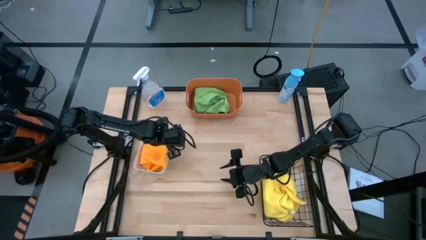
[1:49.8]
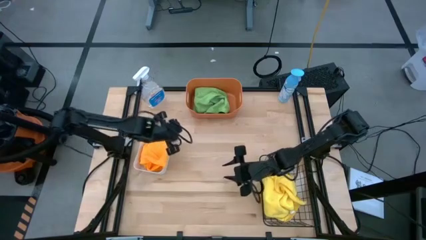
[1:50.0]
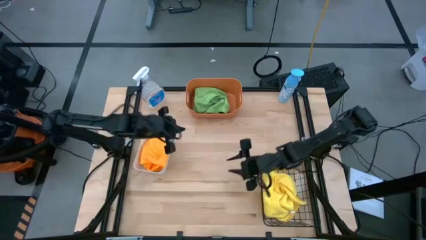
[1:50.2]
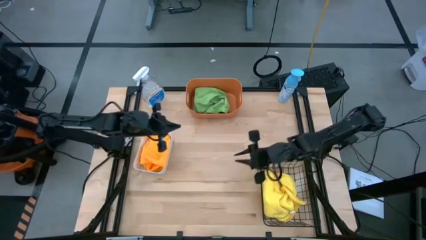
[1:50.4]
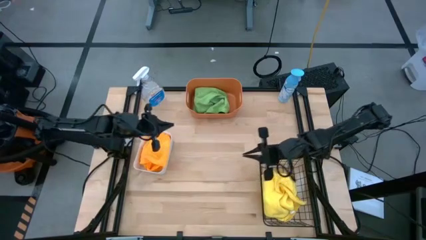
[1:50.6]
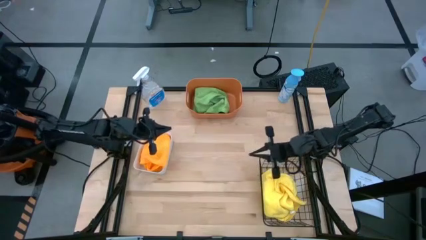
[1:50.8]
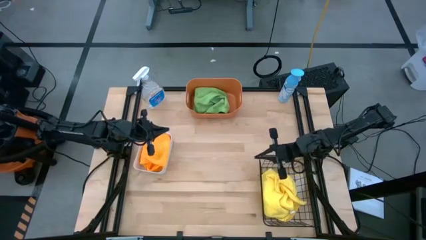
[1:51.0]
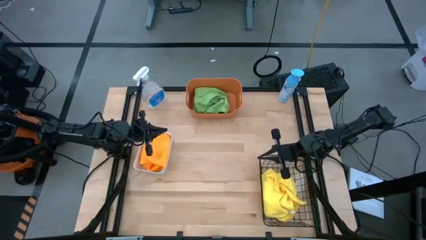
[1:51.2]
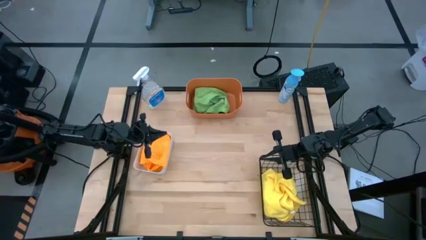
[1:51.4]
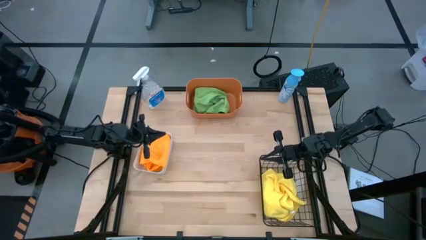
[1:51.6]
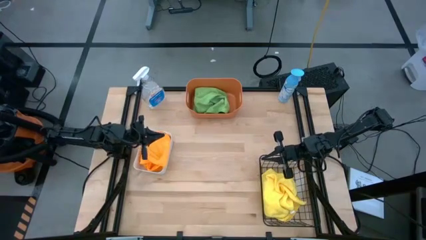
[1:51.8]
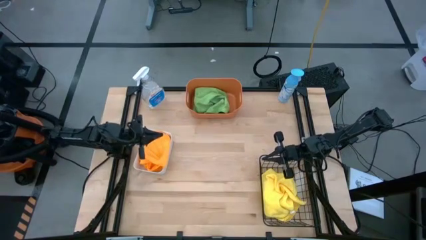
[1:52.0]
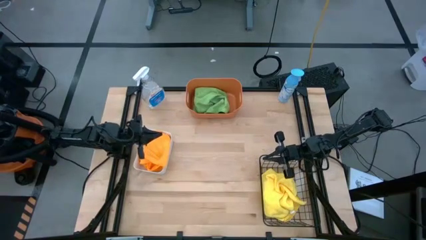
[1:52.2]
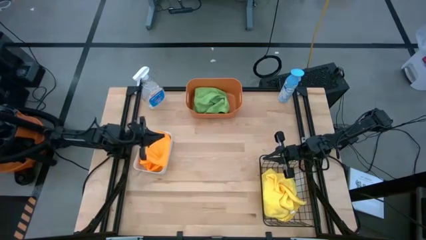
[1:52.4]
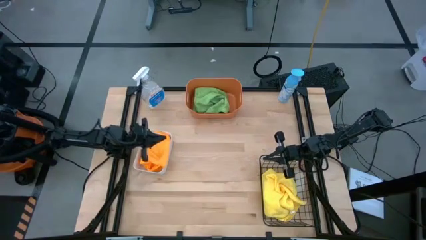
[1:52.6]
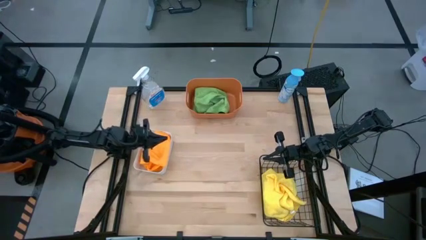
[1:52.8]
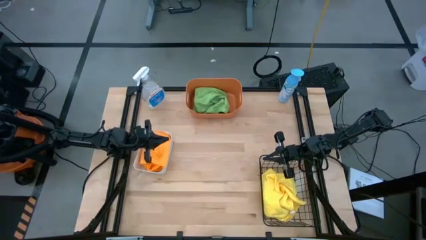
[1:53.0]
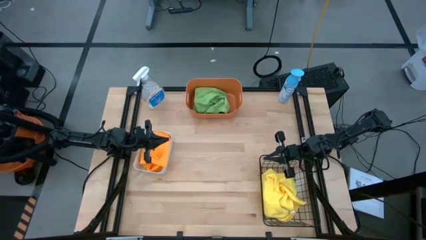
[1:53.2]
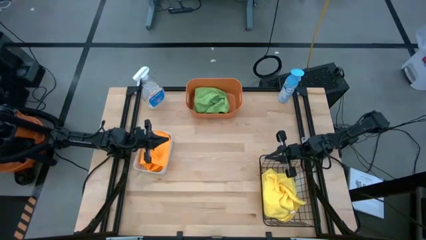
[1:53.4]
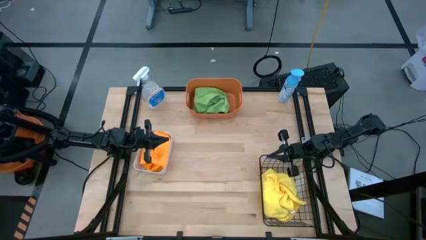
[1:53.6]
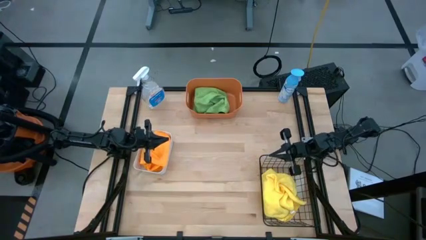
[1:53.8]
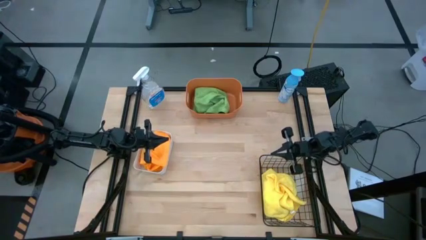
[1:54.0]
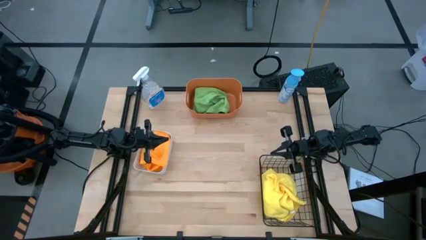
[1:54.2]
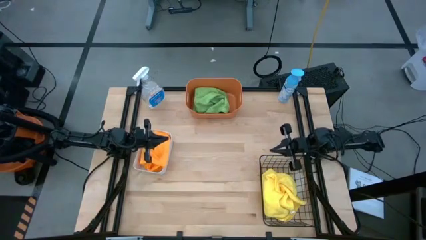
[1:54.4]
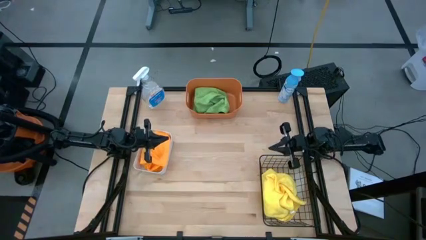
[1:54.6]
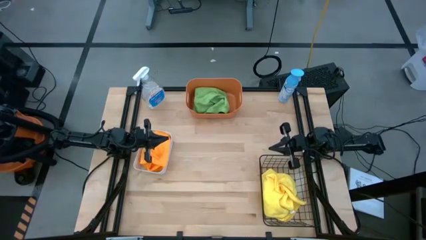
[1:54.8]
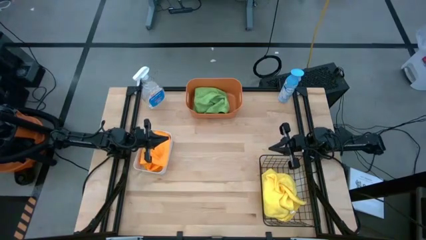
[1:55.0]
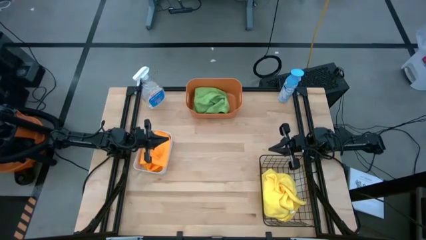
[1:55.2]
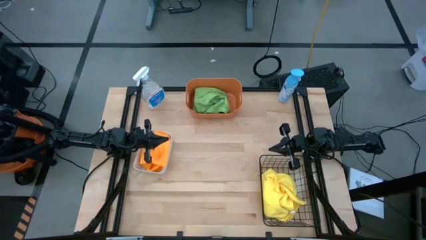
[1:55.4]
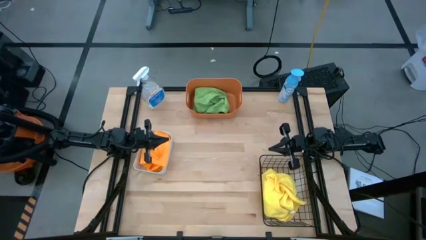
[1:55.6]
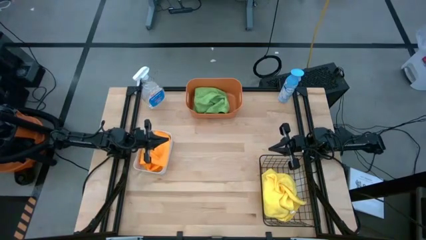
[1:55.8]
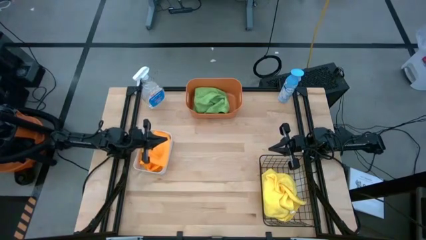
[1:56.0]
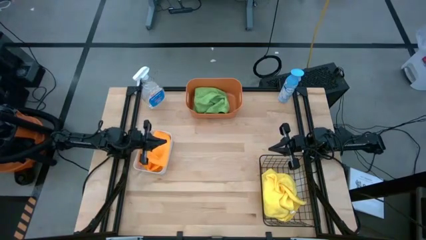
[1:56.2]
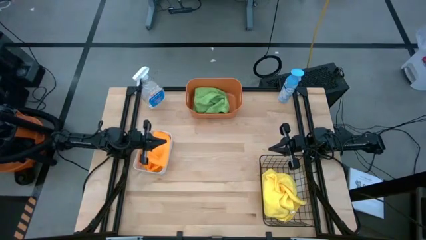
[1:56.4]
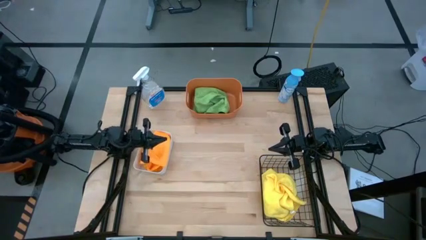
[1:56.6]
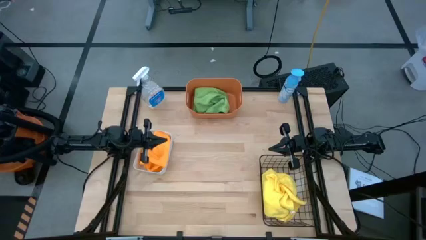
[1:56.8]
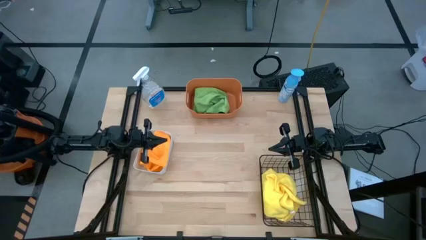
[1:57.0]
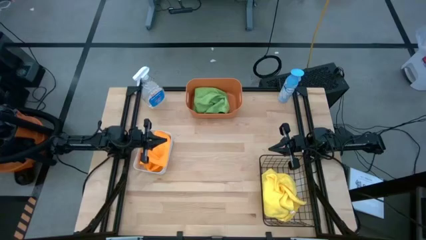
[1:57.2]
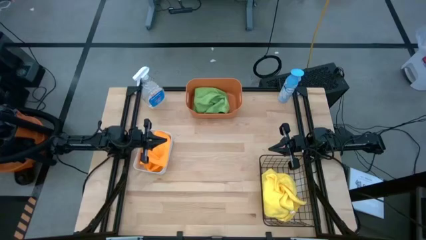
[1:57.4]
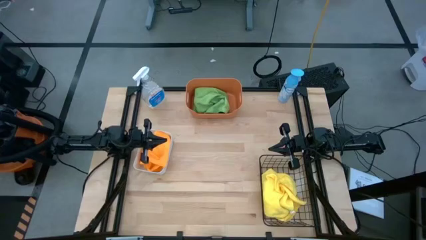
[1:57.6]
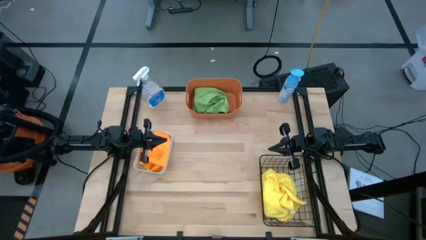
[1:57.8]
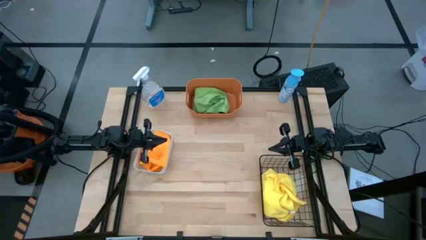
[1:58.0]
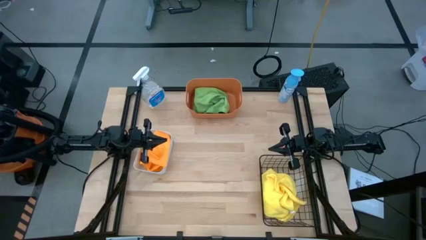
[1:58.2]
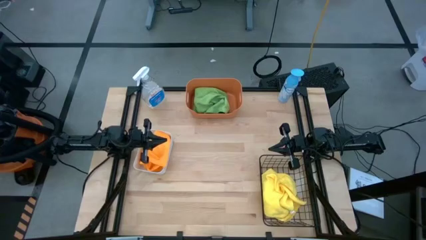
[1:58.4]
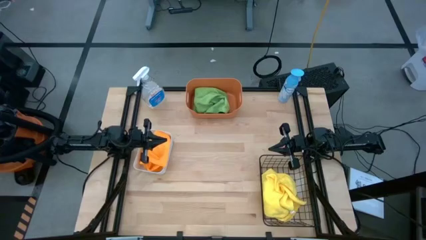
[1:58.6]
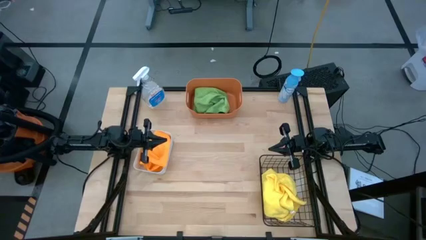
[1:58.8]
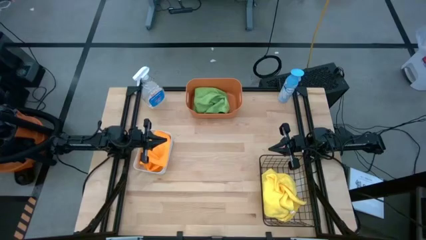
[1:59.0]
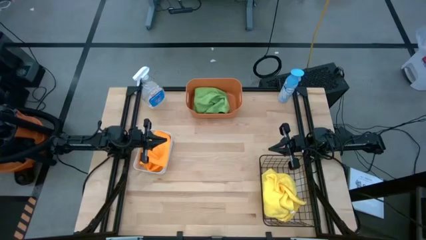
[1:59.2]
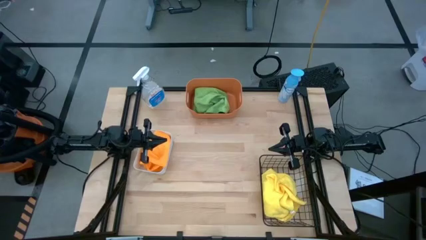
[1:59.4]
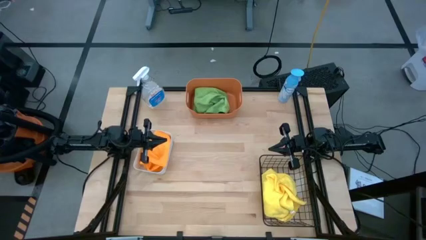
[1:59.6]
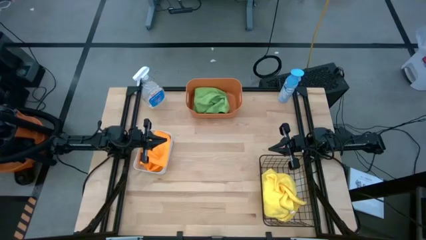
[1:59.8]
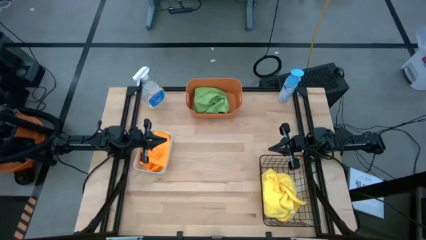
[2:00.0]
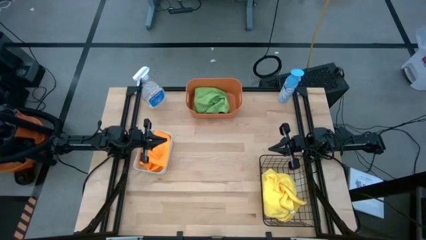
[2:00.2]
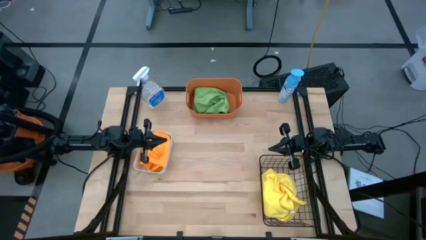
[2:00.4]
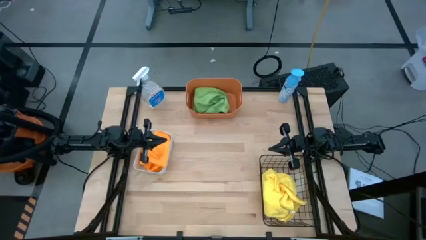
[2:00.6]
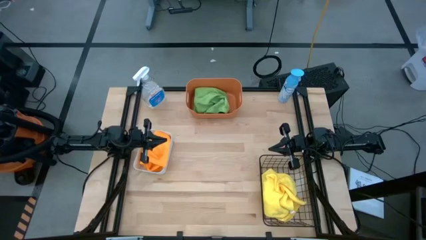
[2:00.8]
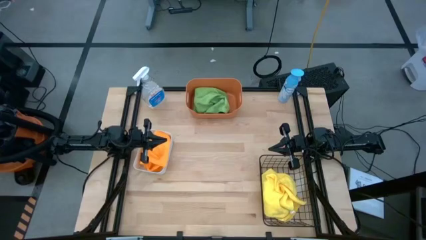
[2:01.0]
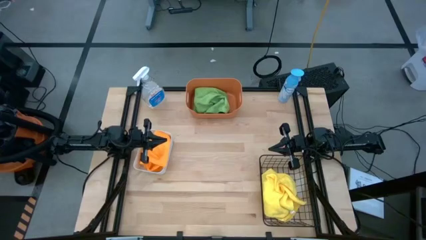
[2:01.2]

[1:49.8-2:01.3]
Task: Sort microfiber towel by color & place in baskets
Return to Home Position

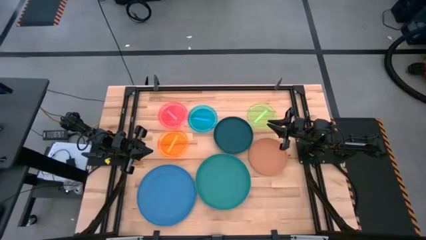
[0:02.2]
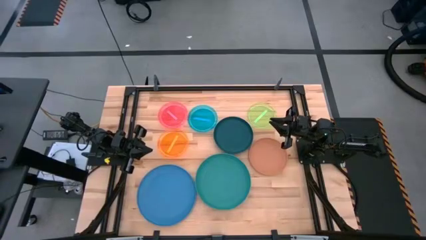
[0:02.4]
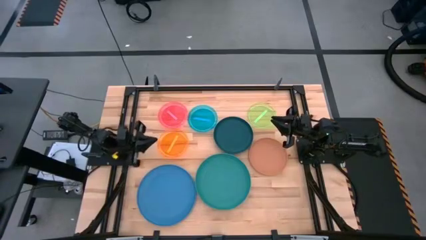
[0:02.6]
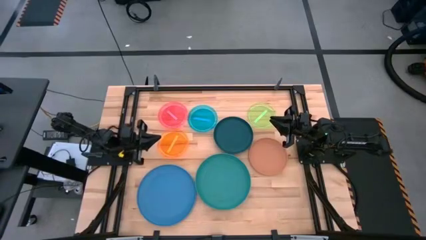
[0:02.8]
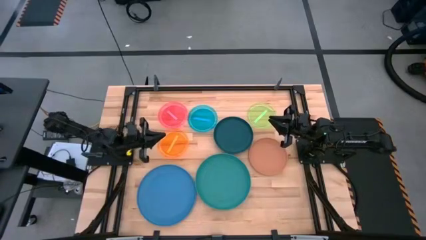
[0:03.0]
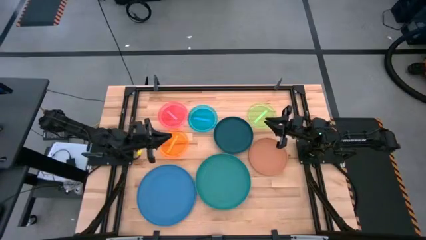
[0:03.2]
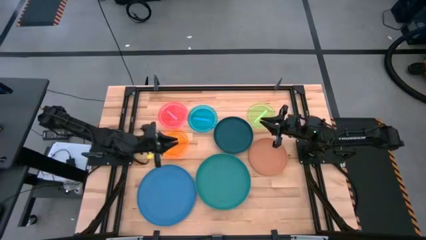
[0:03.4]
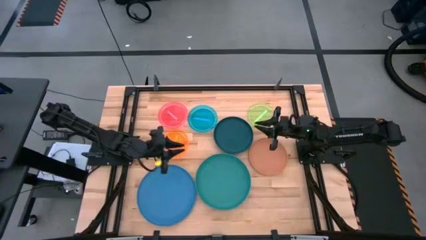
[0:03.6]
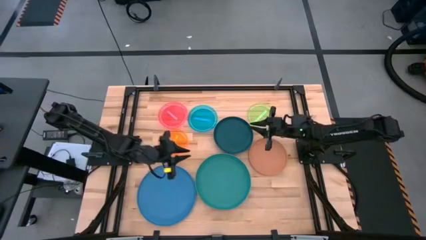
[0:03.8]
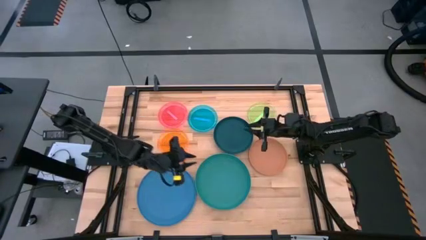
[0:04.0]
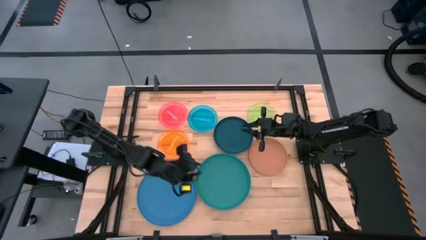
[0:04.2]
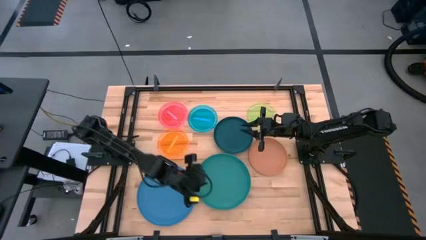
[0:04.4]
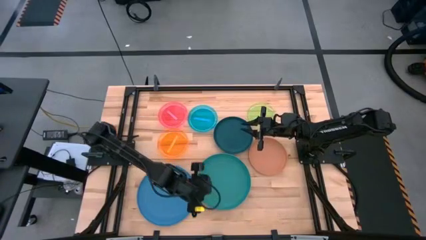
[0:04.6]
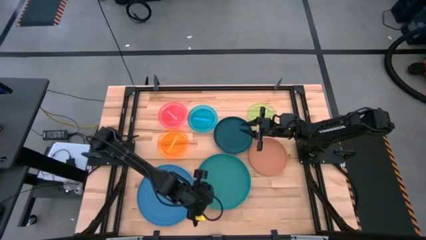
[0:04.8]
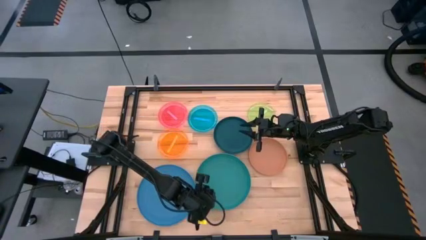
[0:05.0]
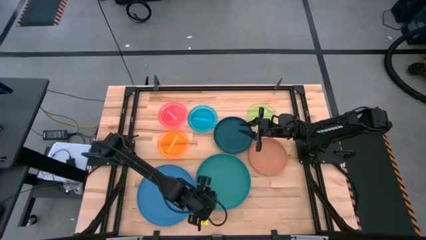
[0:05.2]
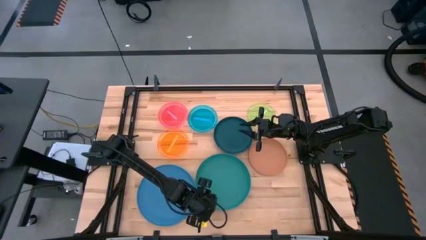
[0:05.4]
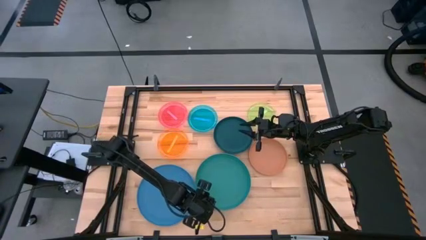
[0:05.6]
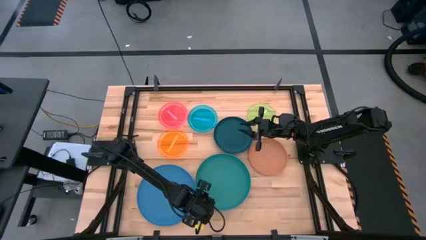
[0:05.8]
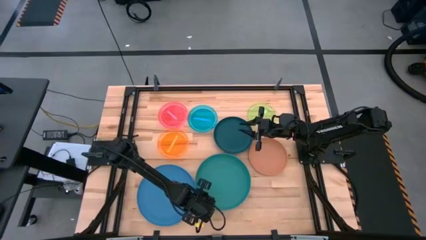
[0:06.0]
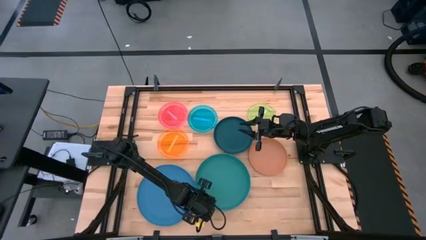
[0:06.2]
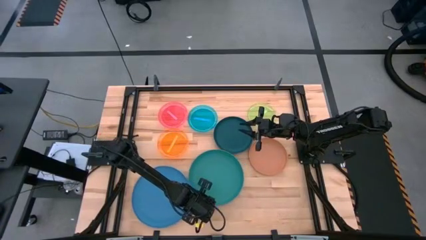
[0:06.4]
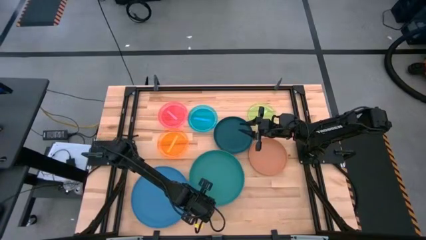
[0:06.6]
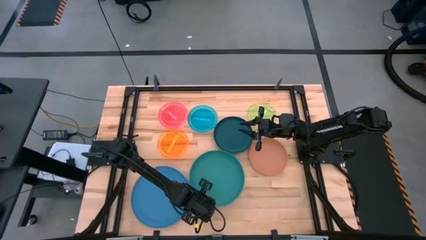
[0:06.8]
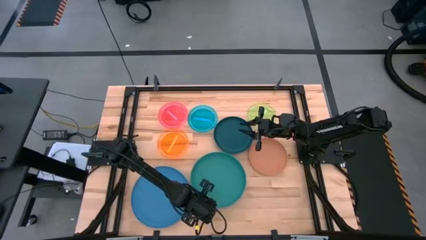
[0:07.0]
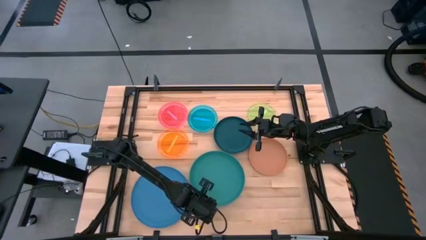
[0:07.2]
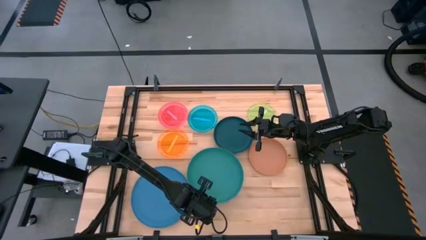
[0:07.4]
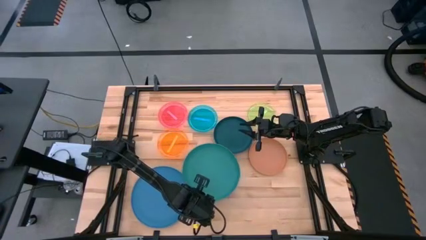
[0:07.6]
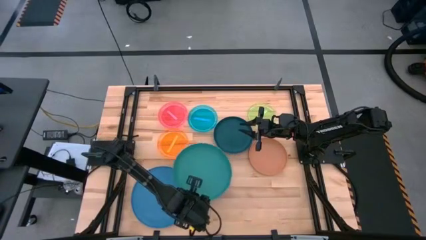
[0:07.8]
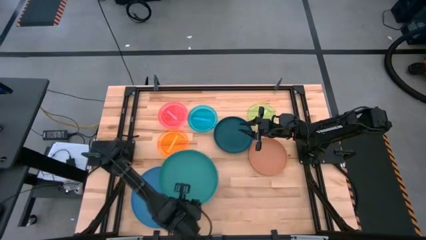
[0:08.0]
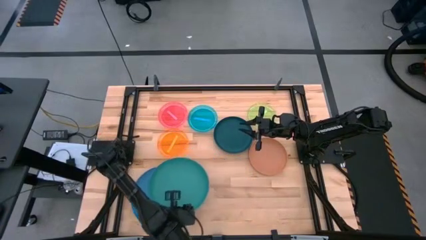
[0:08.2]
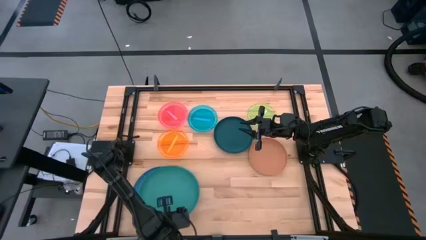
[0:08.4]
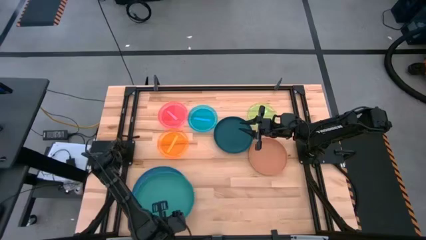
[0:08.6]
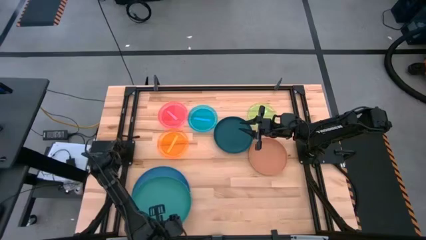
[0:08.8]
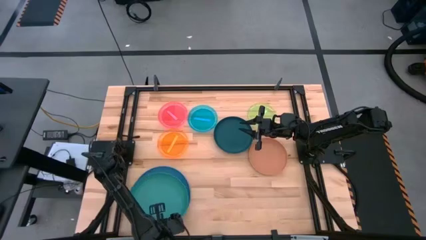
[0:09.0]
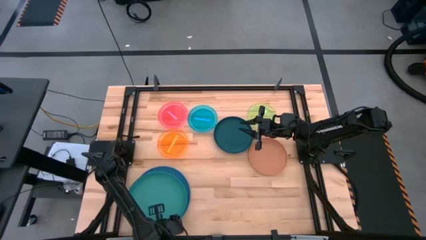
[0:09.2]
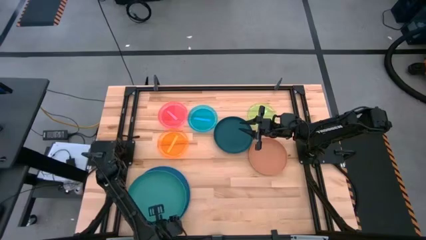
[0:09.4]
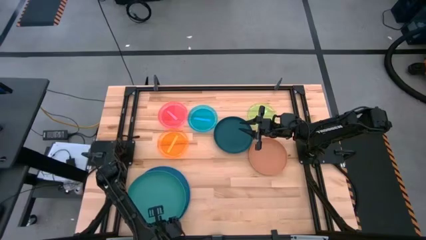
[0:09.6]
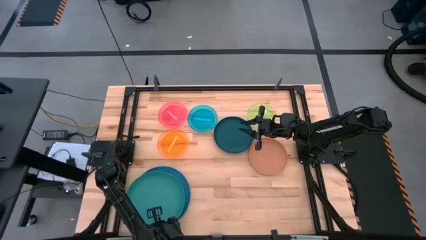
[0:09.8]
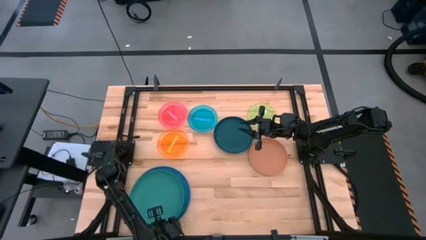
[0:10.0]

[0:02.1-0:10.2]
Task: Stack plastic plates
Stack the green plate on top of the blue plate
